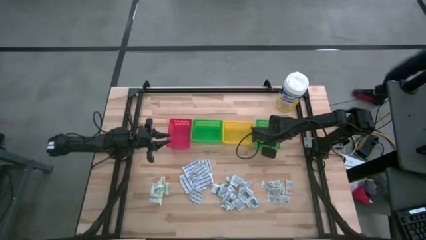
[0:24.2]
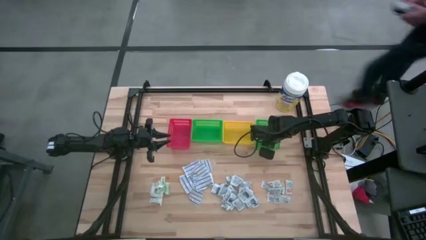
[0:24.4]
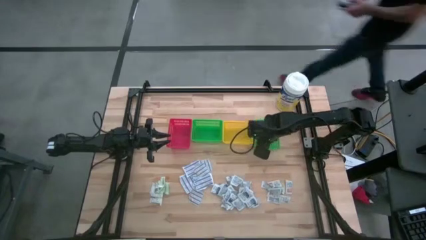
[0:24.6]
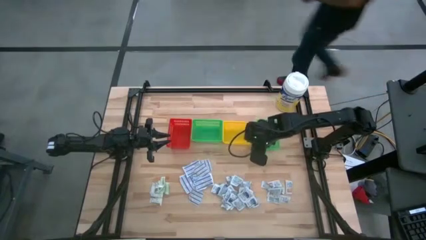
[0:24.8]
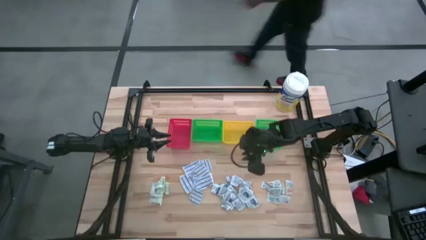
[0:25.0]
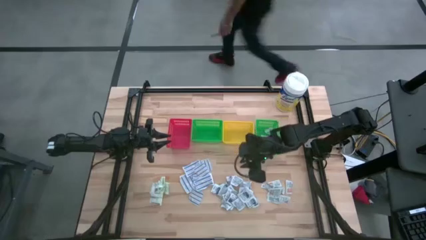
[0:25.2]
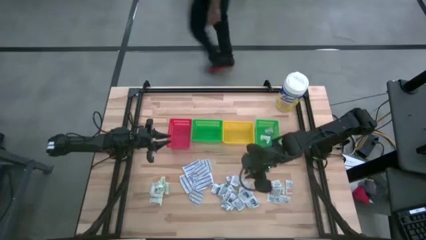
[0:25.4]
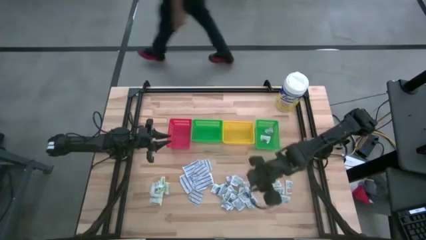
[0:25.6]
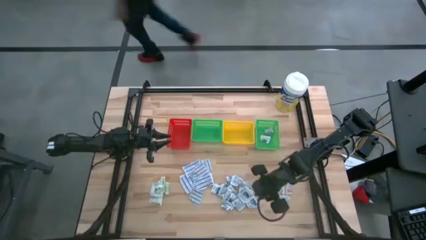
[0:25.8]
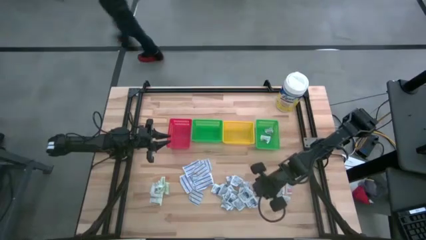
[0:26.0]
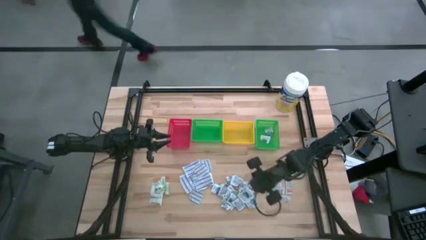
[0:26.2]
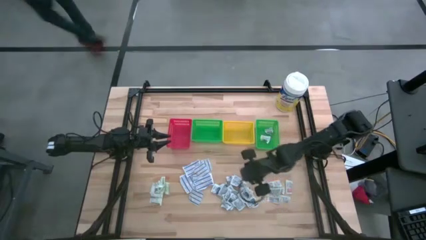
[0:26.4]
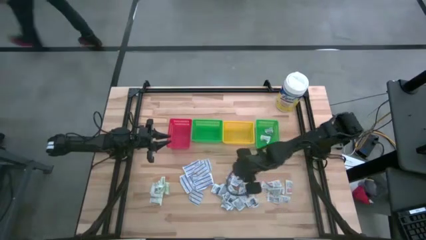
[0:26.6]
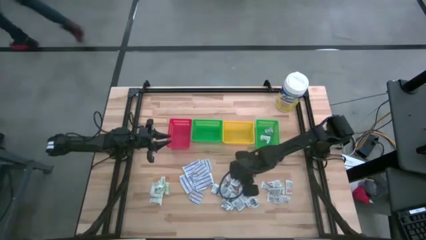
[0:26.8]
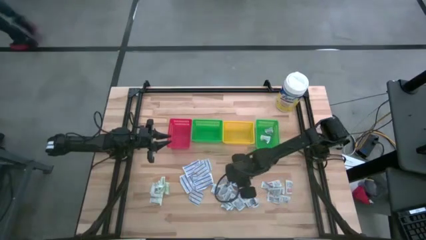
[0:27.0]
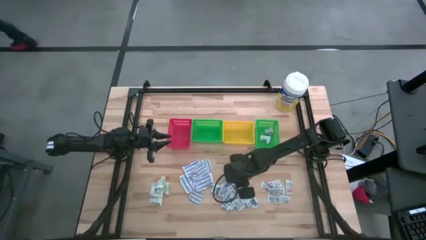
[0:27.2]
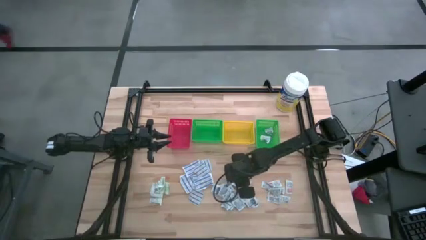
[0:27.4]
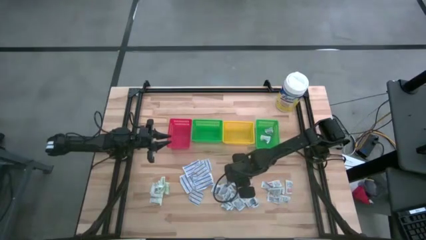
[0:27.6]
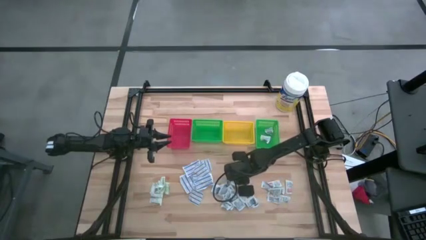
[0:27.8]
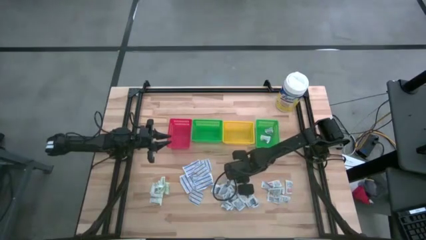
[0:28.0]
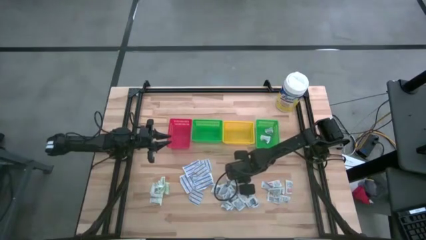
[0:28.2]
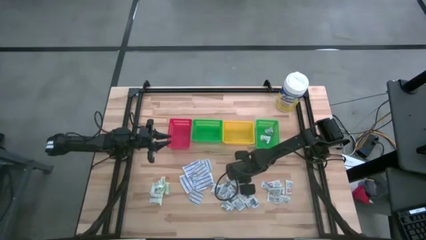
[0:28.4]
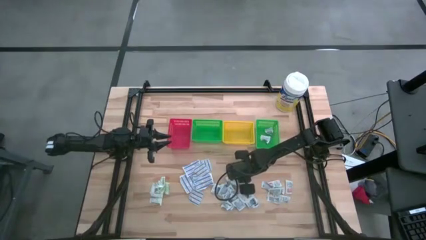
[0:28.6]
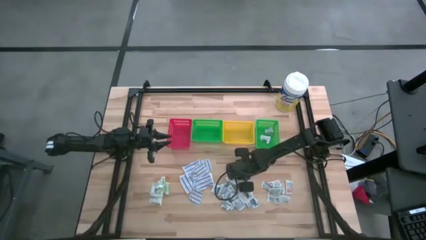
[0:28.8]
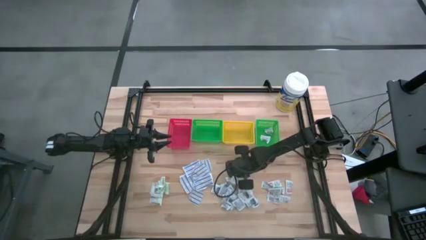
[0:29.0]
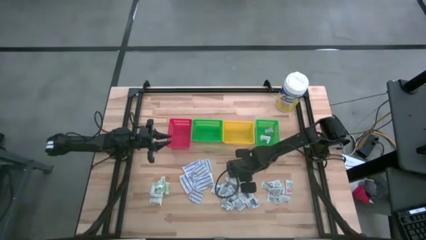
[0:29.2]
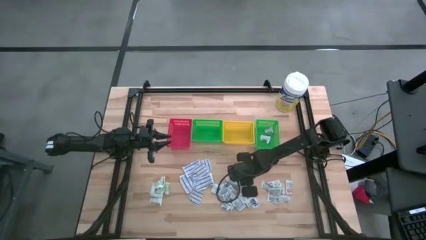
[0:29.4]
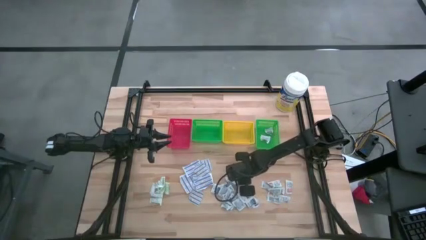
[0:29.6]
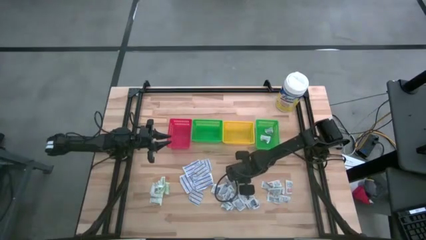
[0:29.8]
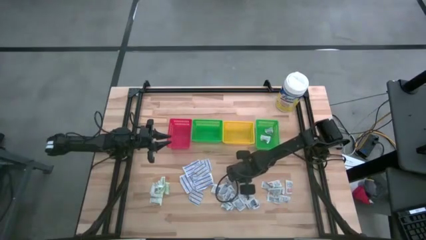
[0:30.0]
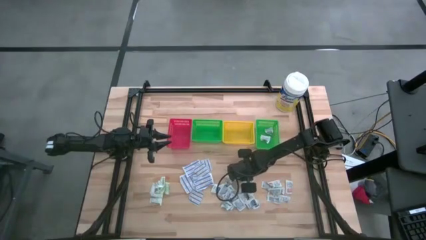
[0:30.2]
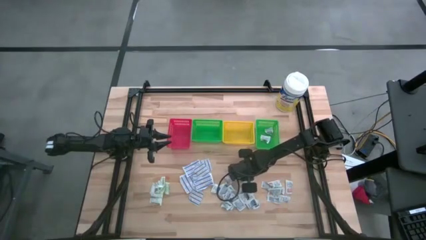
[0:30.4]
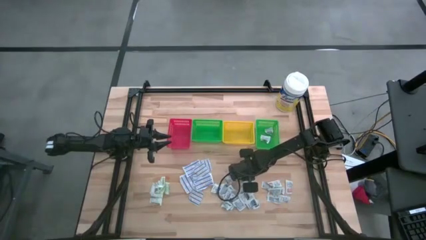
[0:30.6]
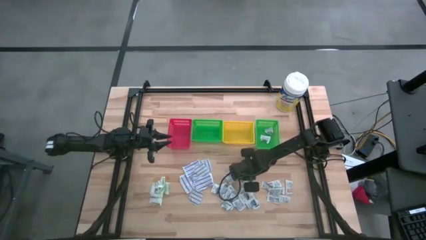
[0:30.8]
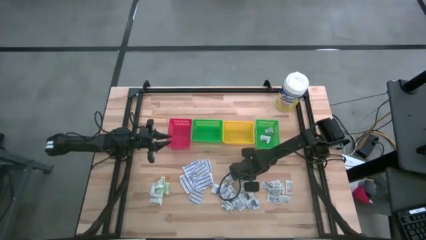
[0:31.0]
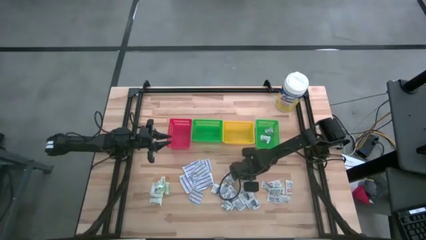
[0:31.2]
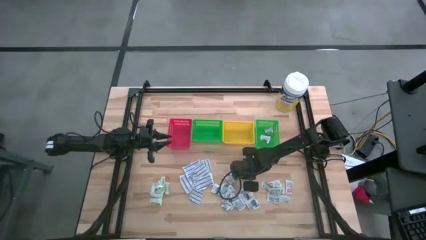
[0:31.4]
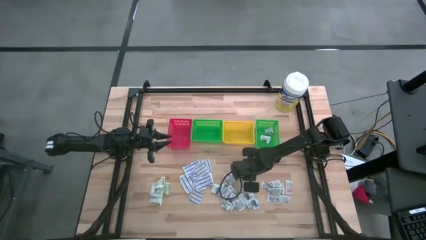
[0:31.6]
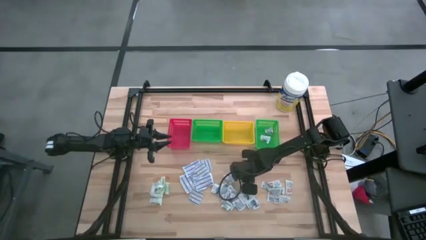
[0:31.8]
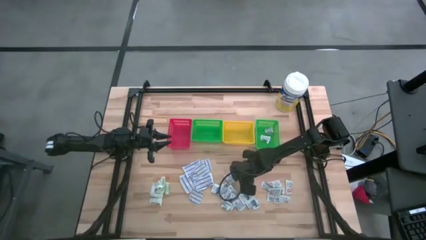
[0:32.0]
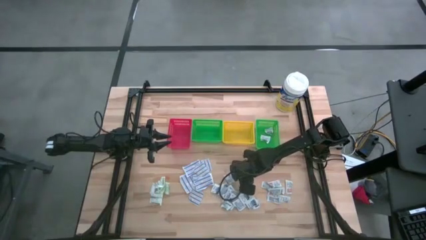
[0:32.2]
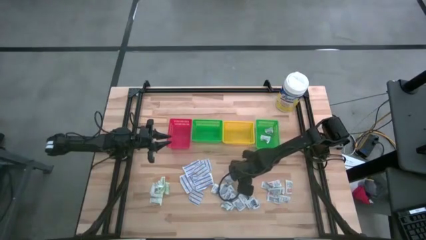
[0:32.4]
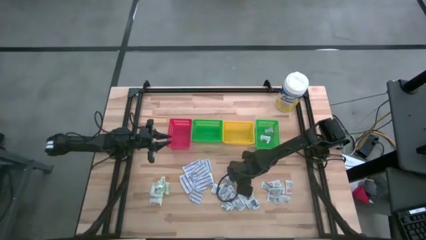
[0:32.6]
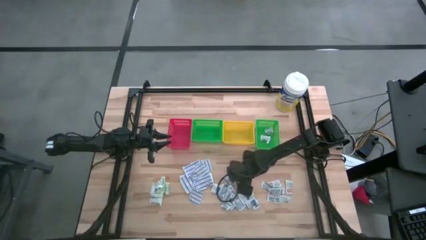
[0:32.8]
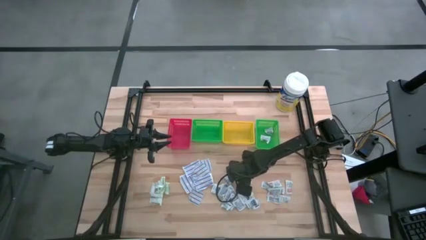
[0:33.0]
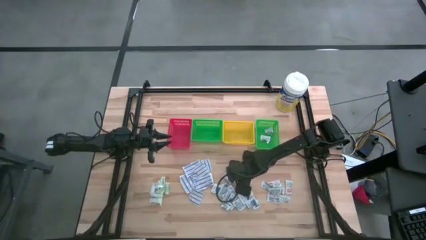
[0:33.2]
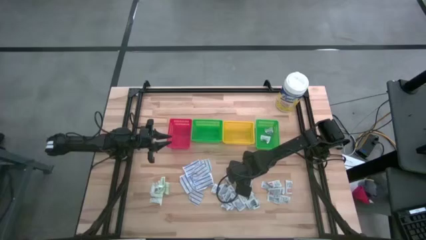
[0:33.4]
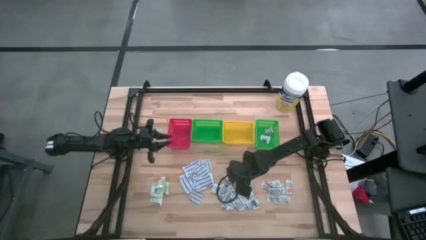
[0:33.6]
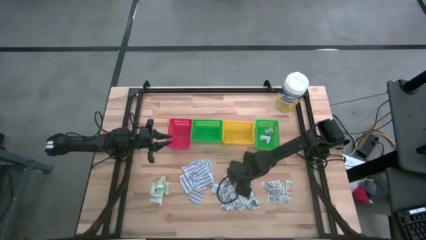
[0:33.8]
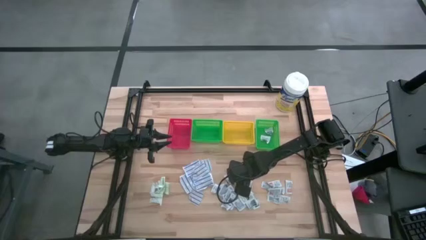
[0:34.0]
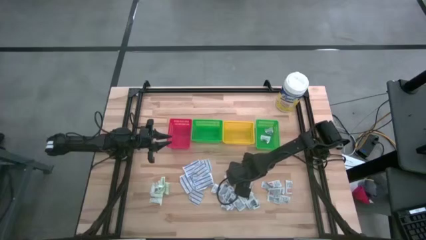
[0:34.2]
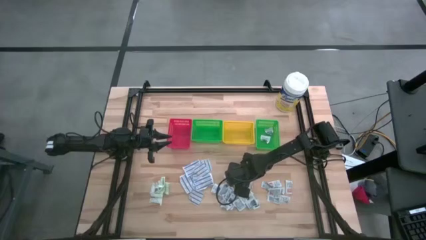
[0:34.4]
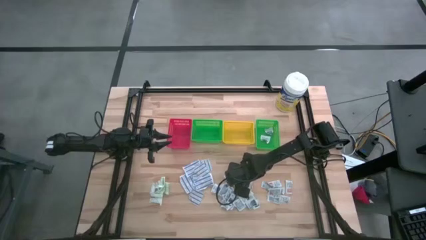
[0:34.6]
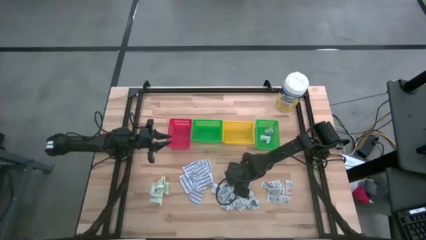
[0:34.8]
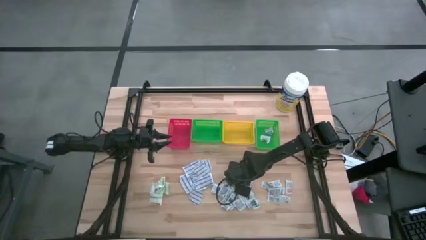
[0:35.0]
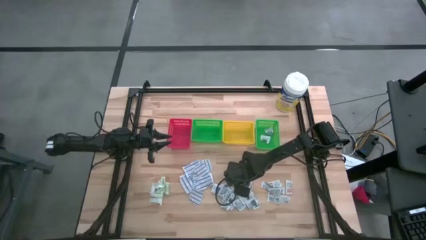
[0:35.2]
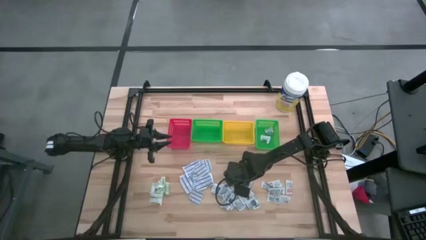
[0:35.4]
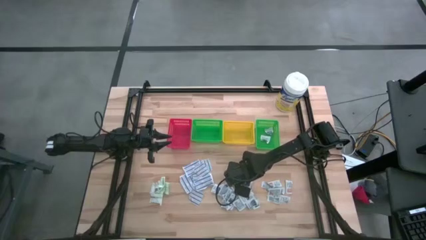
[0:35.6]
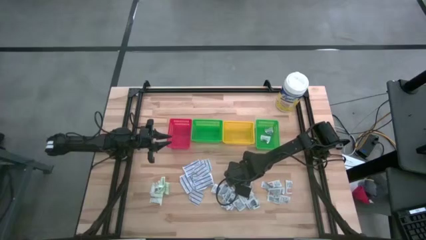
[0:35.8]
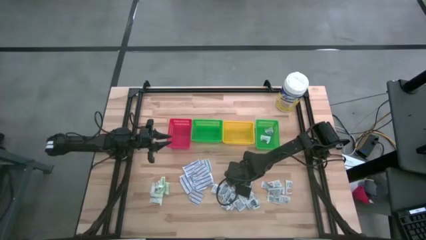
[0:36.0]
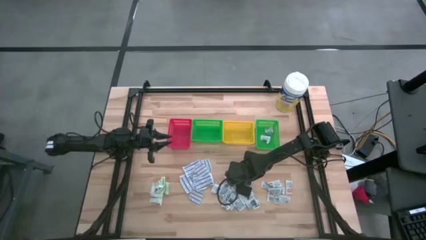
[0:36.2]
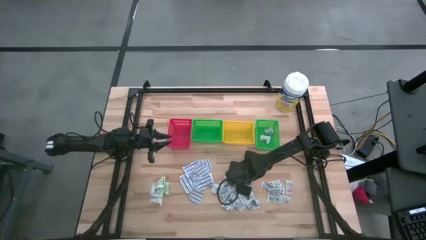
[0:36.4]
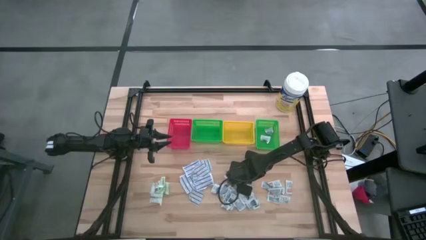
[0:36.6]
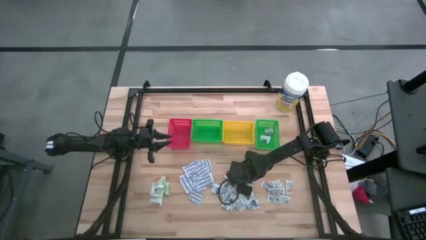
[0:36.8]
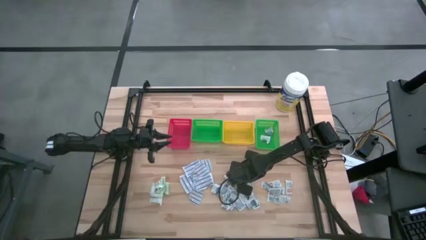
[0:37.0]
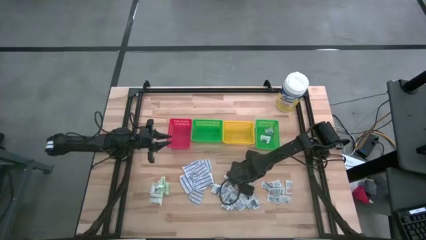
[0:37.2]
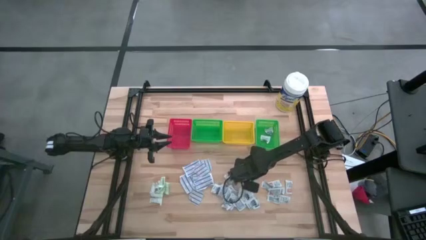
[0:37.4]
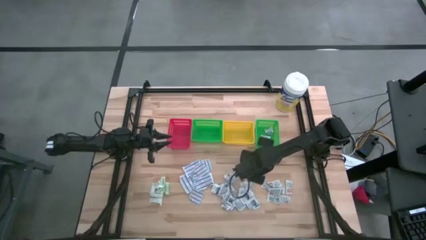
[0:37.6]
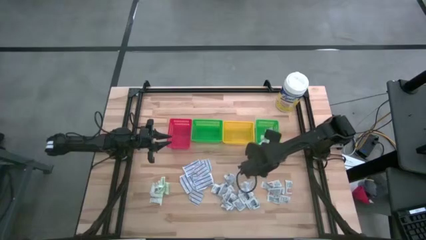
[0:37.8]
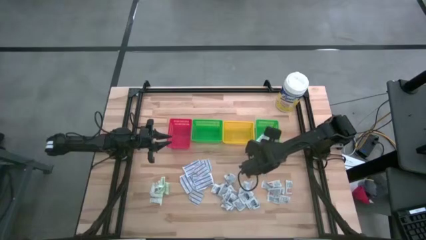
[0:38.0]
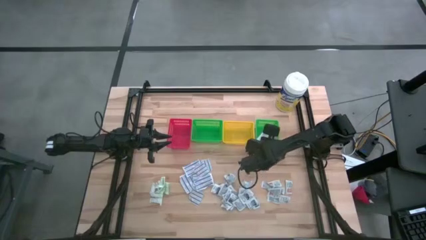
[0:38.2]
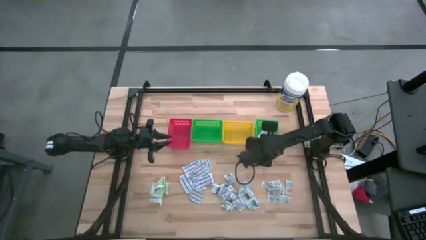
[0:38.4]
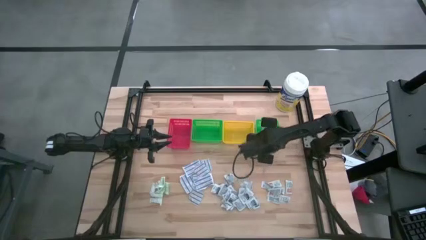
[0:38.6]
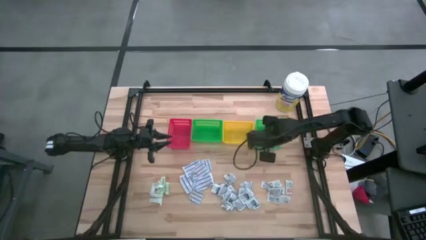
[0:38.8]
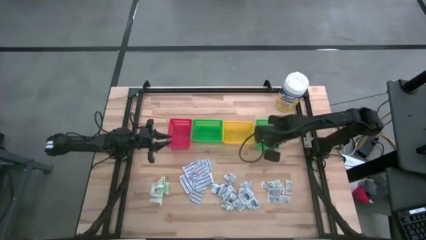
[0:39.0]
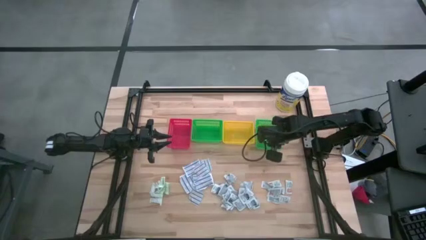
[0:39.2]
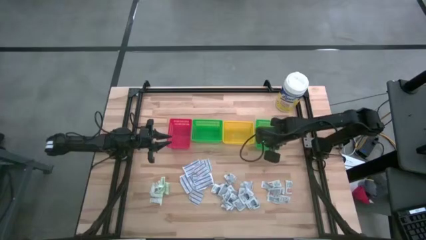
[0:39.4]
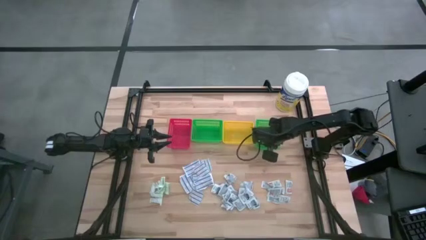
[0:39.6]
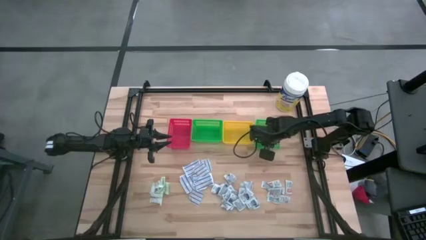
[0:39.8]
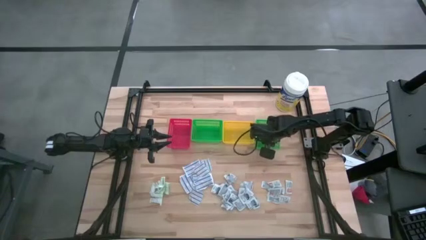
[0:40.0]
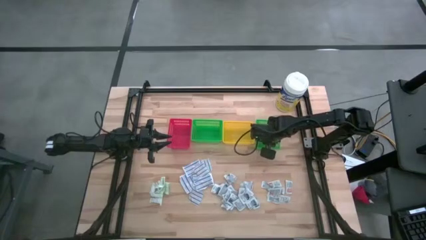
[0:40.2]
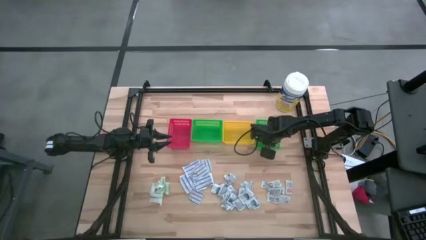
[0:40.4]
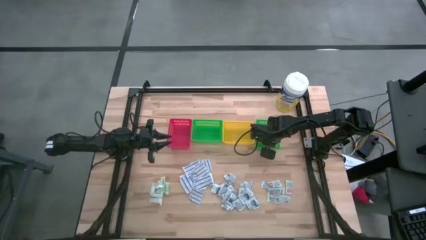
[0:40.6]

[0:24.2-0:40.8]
Task: Pick & Place First Aid Supplies
Put the blue alcohol pad into the right green bin
